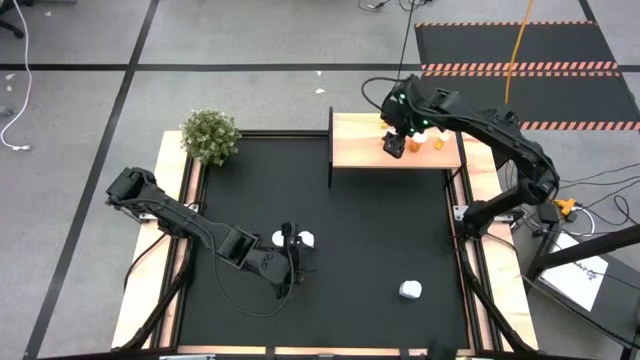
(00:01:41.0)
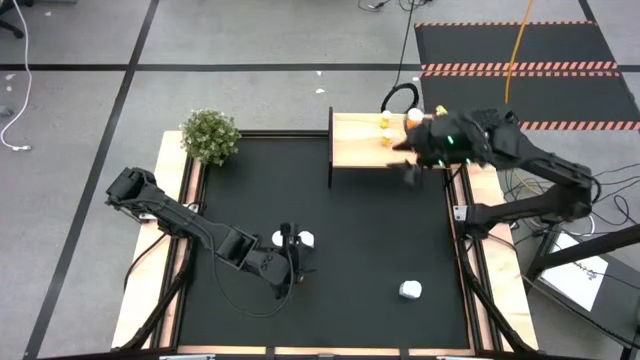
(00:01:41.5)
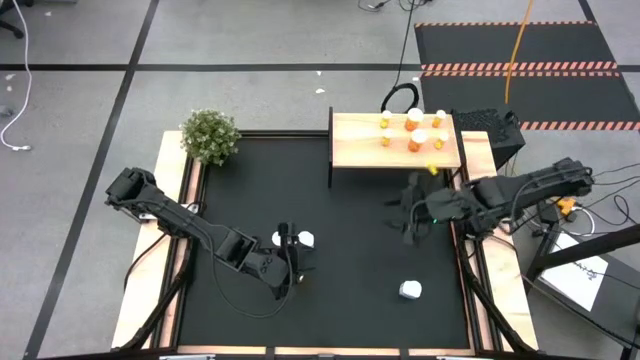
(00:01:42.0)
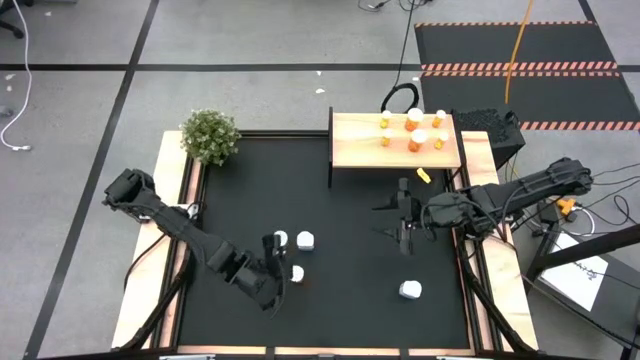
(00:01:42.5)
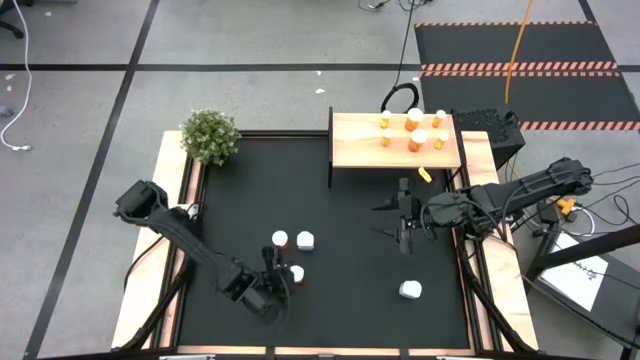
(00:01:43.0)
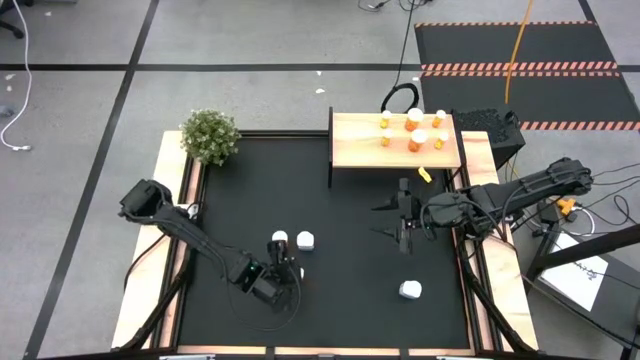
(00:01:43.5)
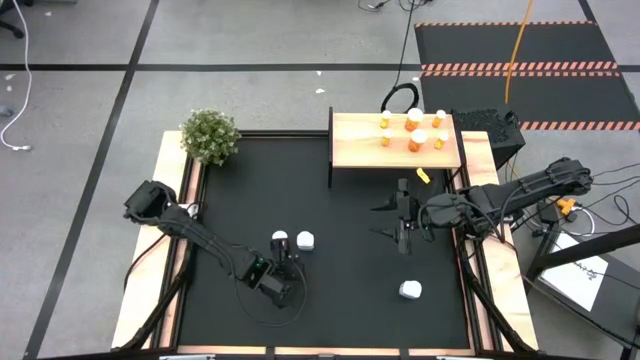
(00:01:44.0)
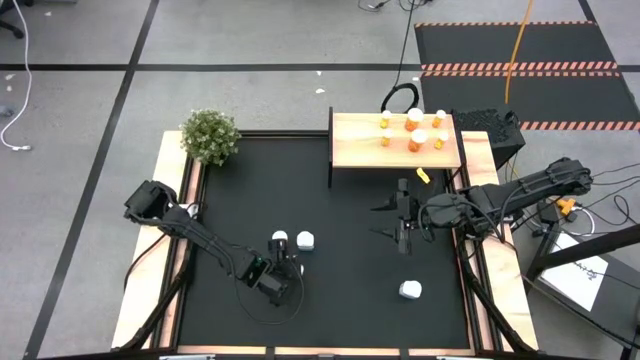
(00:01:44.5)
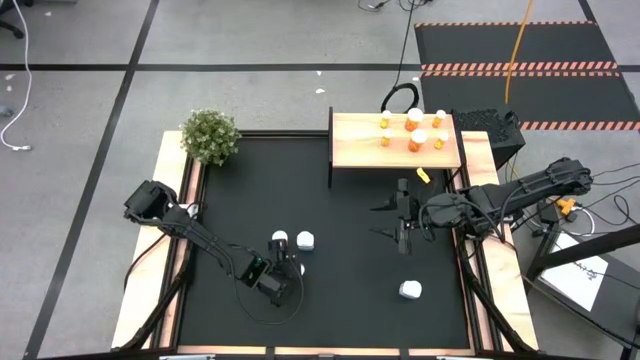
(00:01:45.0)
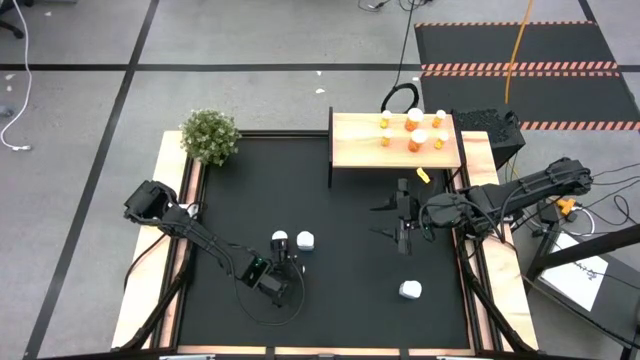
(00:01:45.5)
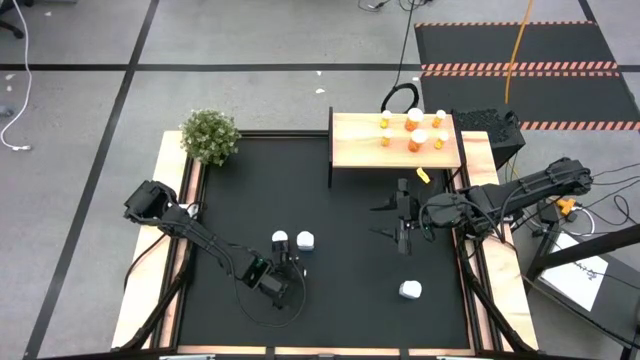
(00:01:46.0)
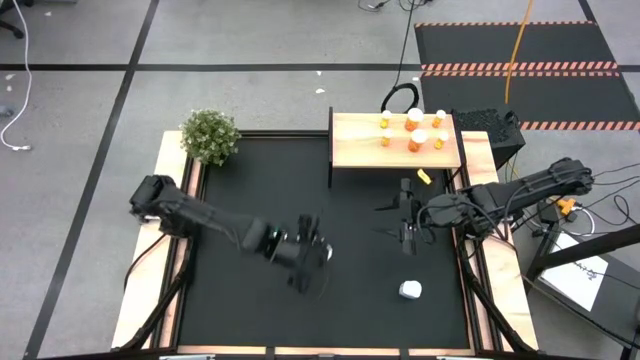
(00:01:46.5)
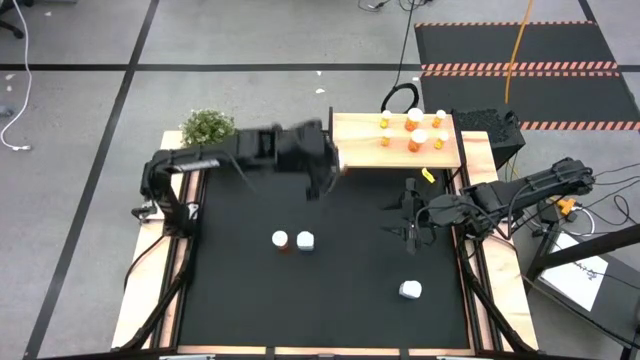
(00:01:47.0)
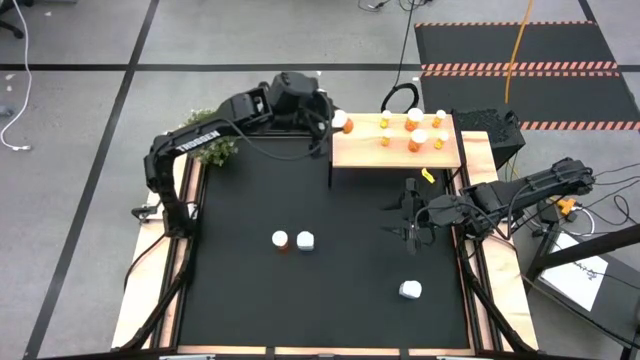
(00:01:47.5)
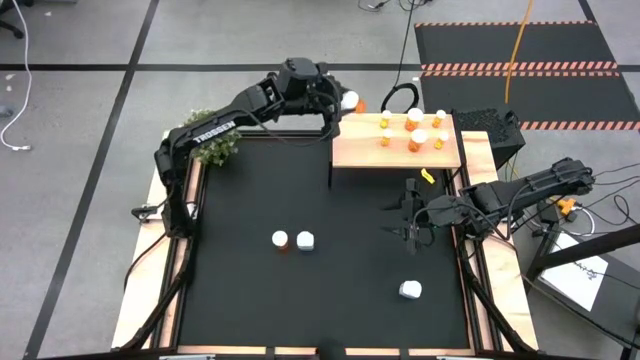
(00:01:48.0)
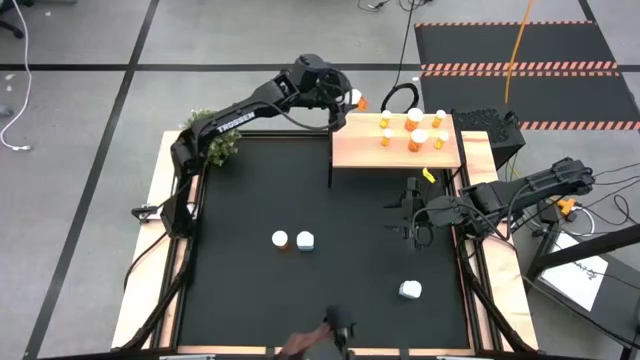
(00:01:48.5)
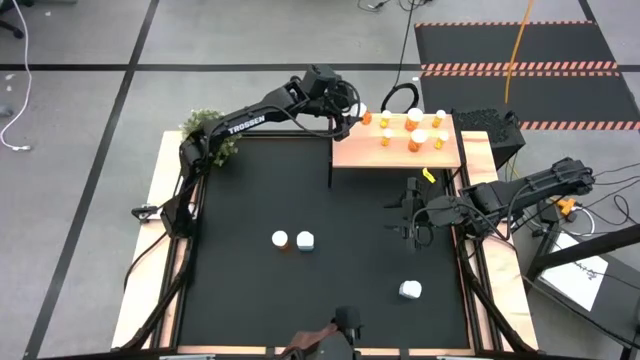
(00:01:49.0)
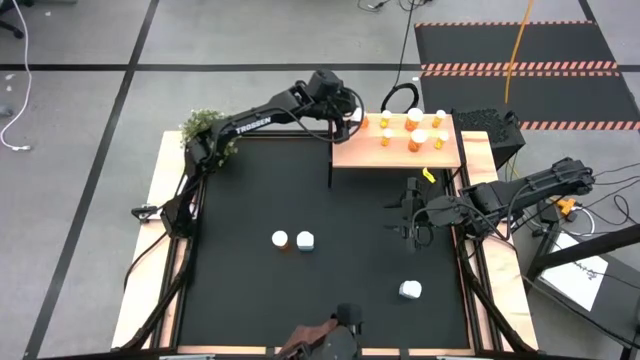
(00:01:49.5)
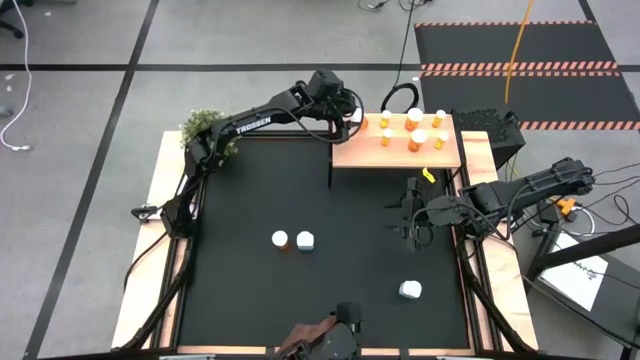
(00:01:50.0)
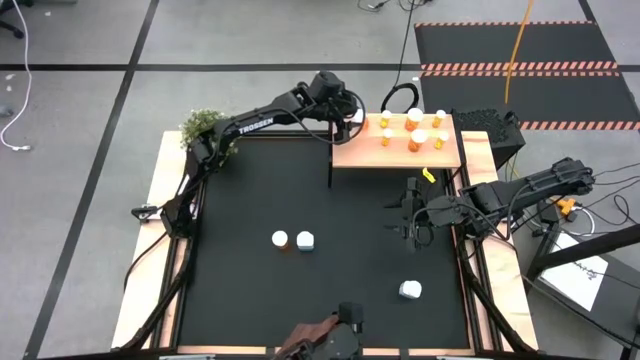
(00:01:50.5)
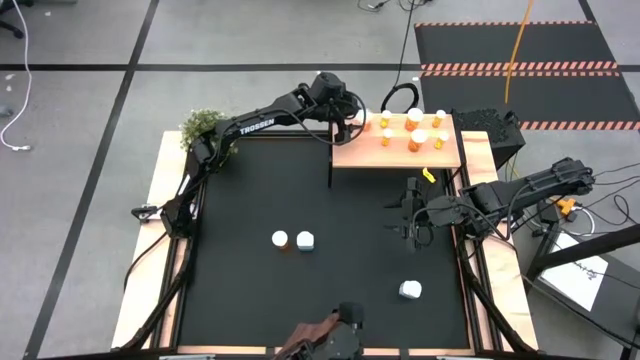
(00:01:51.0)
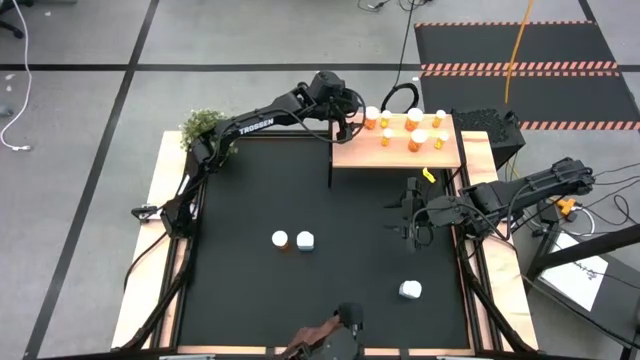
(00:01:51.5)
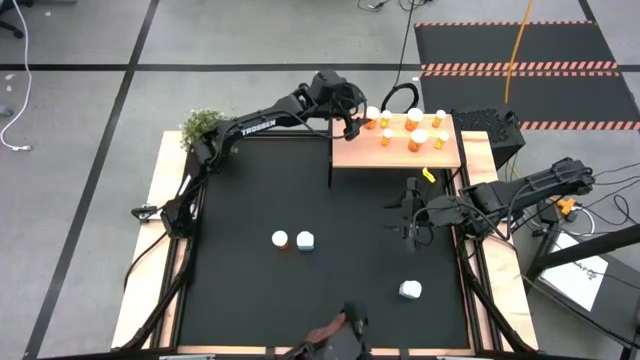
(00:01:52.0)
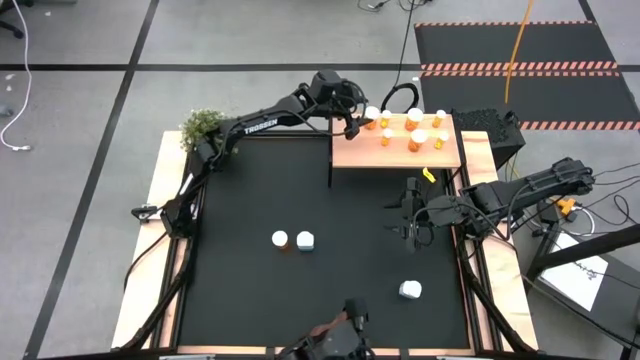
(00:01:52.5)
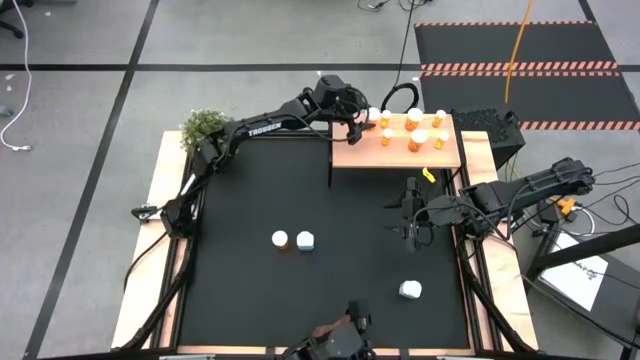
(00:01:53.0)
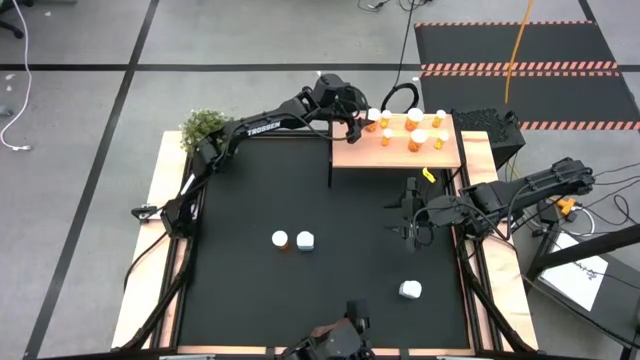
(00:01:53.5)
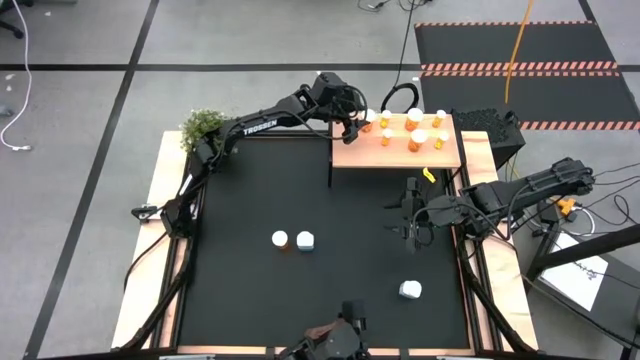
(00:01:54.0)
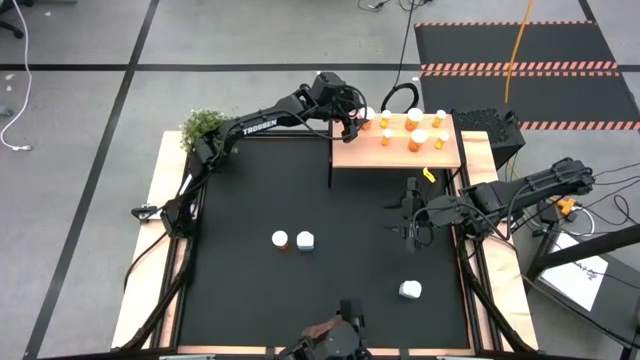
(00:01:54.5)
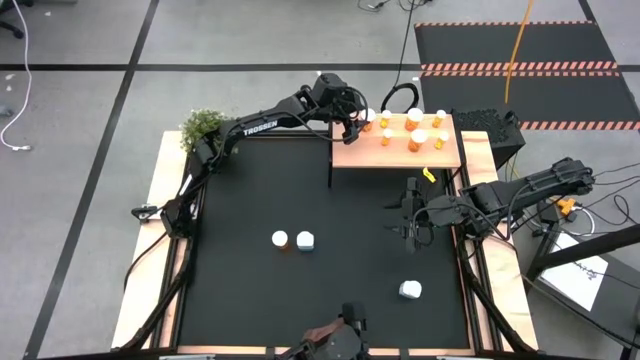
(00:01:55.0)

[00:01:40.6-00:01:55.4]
Task: Pick and place medicine bottles onto shelf by color
Put the large orange pill bottle on the shelf

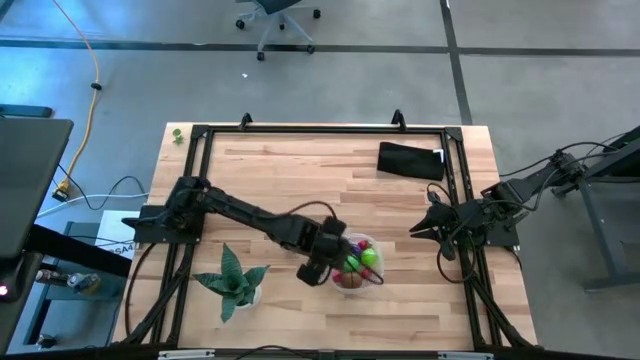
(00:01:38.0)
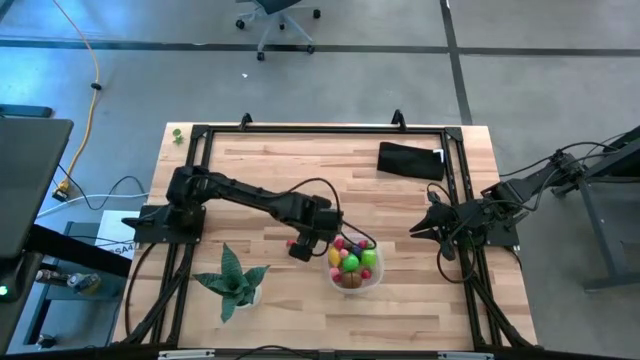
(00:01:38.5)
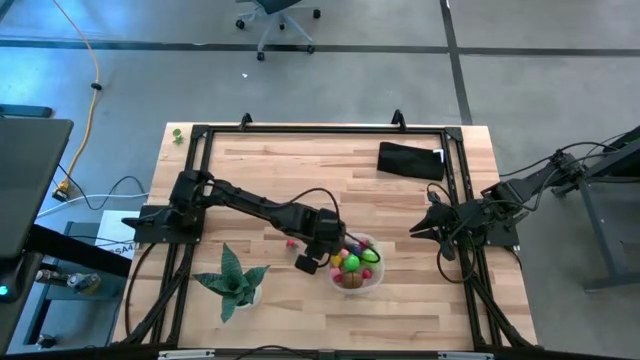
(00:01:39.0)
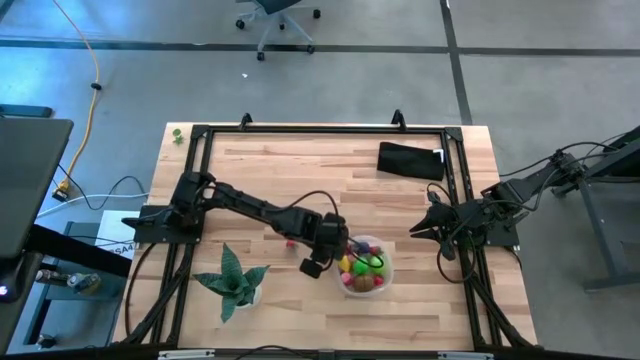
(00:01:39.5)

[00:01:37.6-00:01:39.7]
Task: Pick and placing Produce into tupperware
Adjust the transparent bin on the table

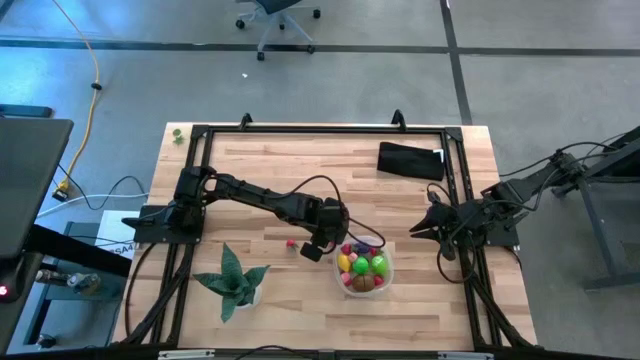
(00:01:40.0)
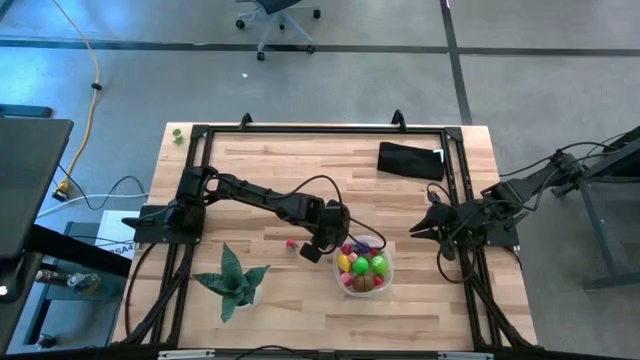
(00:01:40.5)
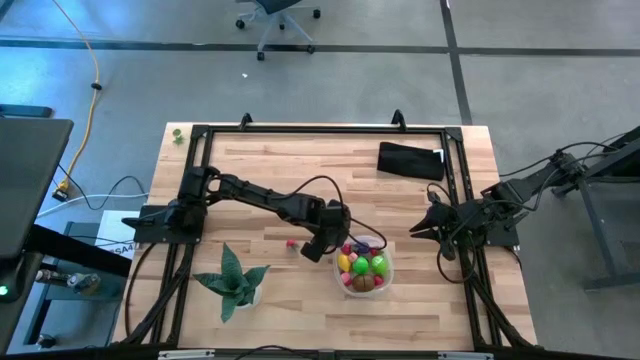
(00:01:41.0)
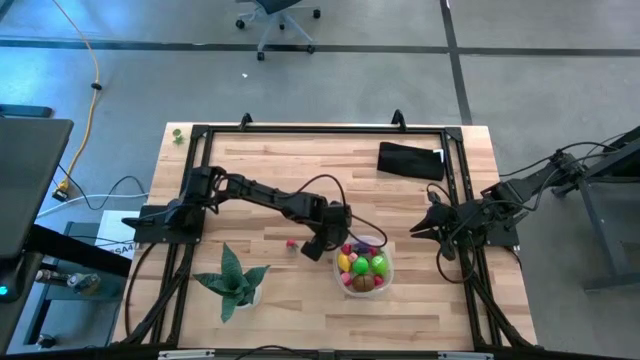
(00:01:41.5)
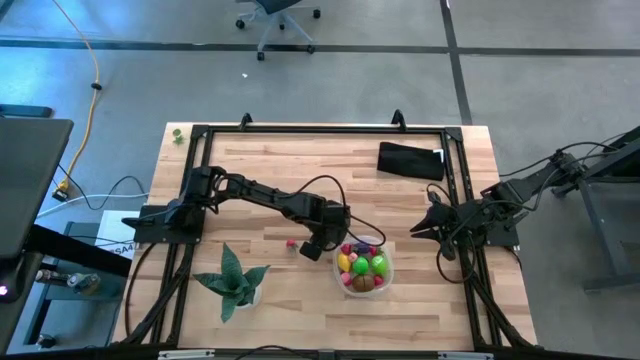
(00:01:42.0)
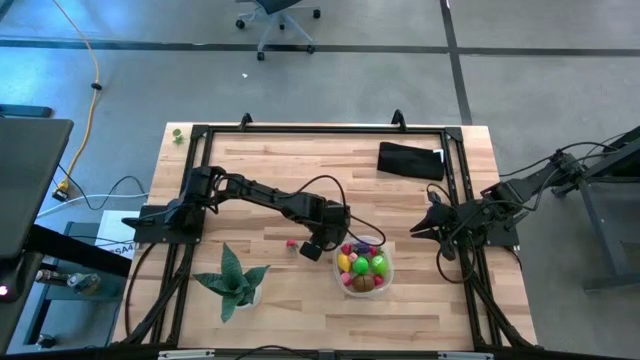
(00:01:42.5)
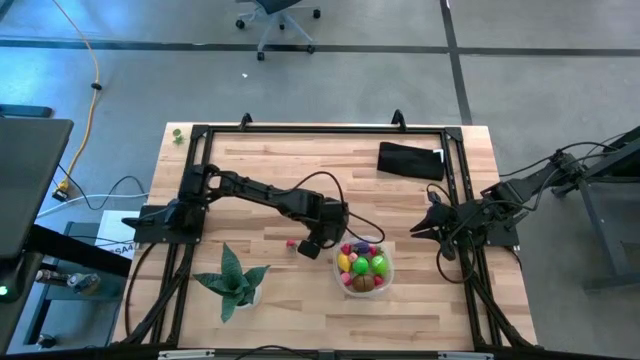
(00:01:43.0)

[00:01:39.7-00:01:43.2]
Put the cherry into the transparent bin
